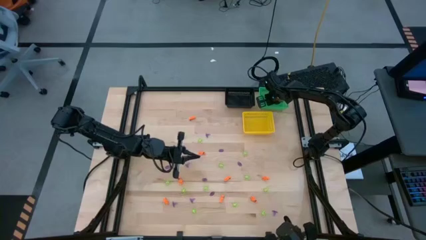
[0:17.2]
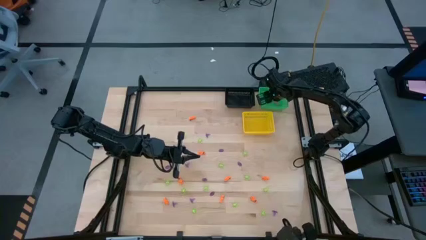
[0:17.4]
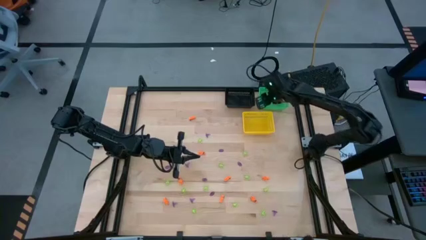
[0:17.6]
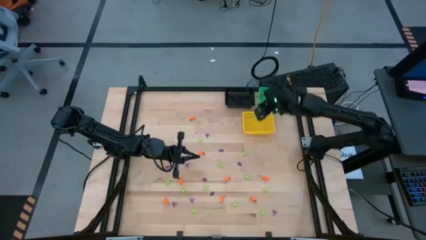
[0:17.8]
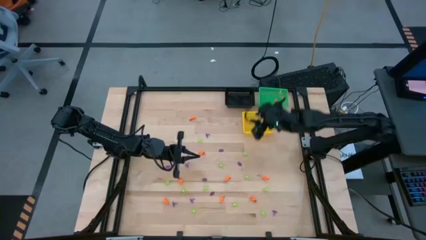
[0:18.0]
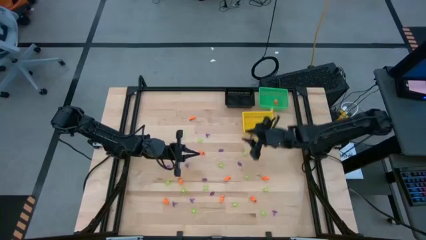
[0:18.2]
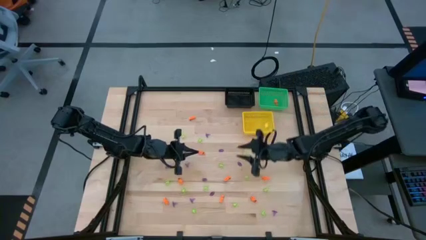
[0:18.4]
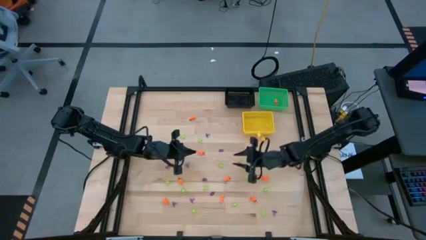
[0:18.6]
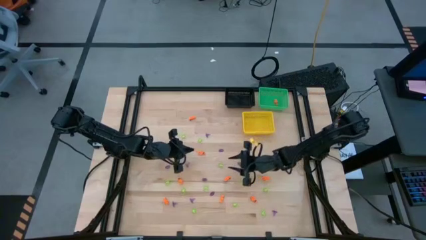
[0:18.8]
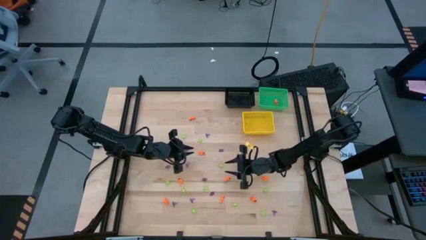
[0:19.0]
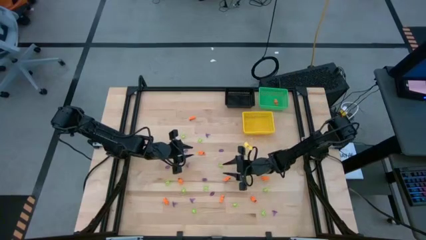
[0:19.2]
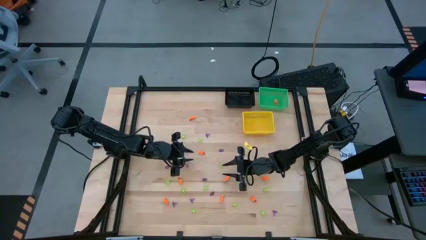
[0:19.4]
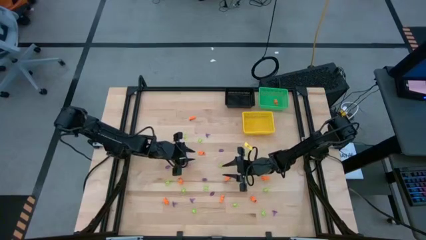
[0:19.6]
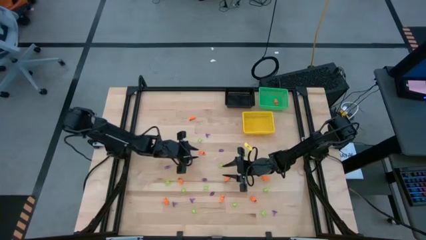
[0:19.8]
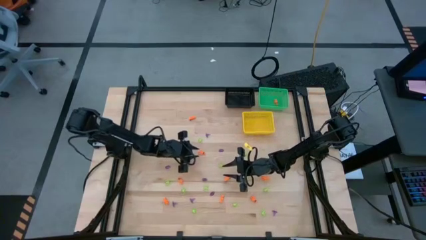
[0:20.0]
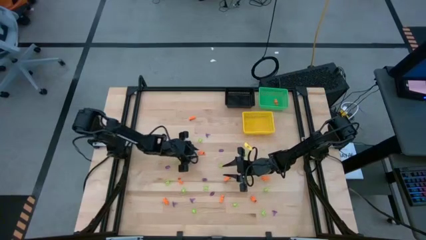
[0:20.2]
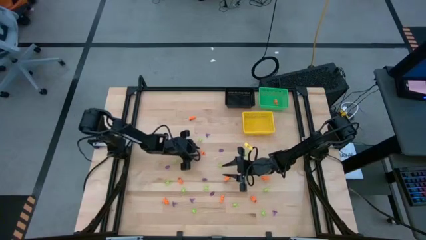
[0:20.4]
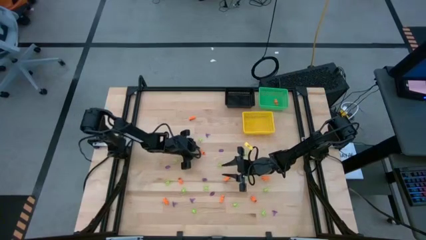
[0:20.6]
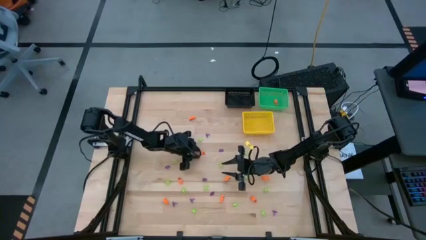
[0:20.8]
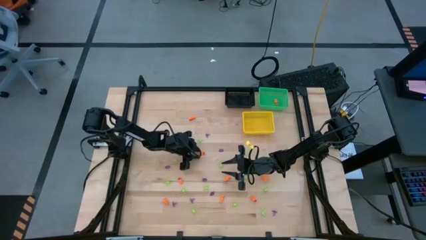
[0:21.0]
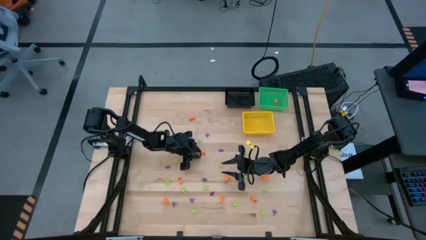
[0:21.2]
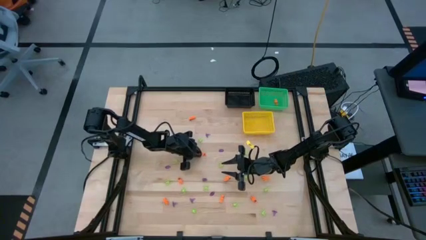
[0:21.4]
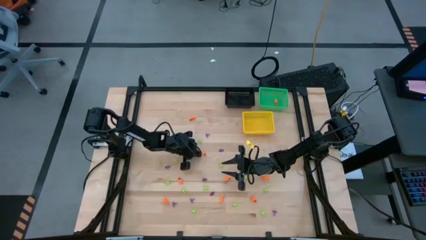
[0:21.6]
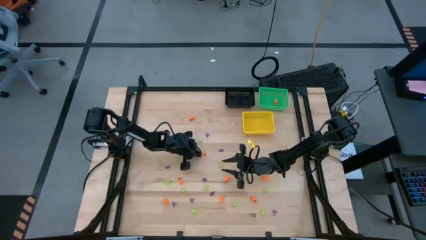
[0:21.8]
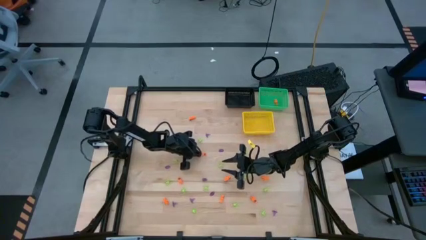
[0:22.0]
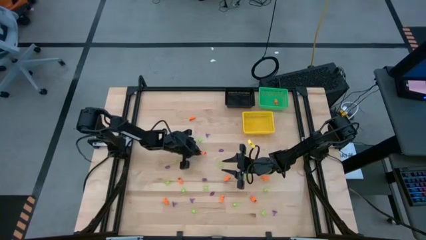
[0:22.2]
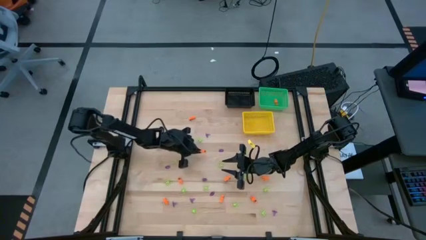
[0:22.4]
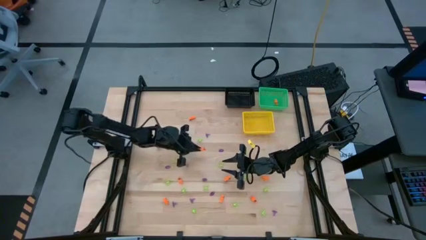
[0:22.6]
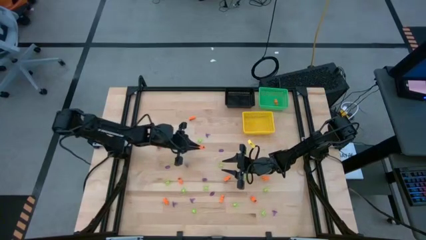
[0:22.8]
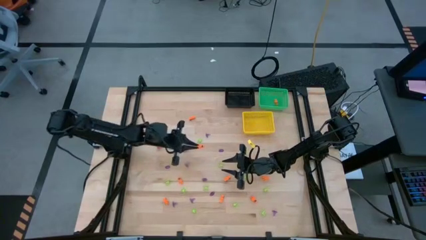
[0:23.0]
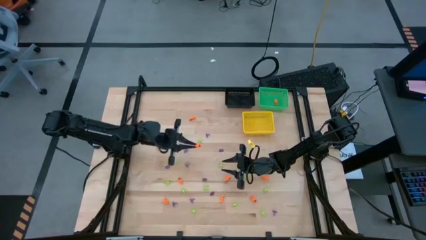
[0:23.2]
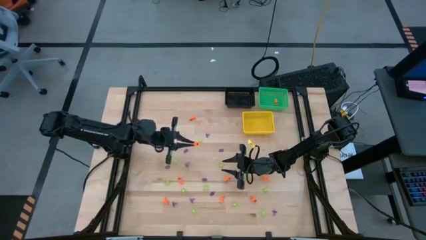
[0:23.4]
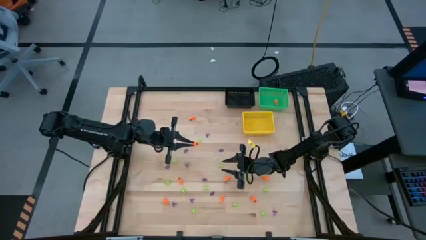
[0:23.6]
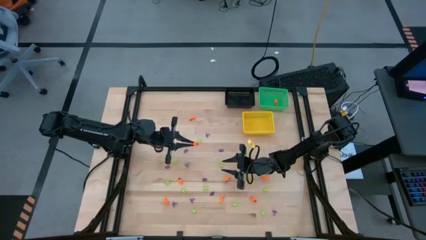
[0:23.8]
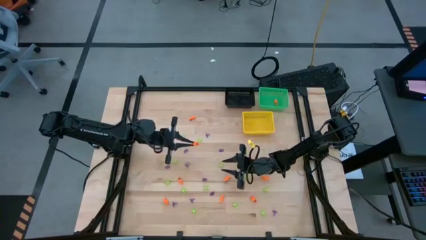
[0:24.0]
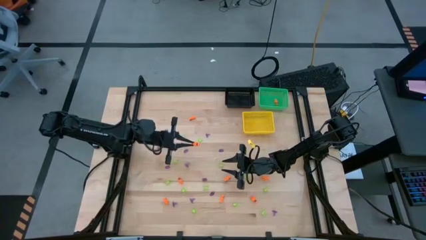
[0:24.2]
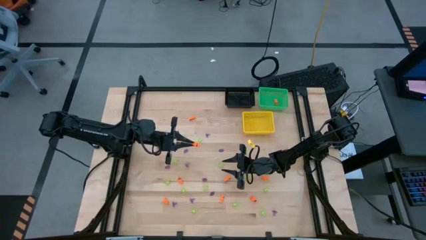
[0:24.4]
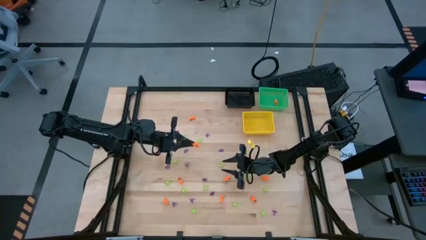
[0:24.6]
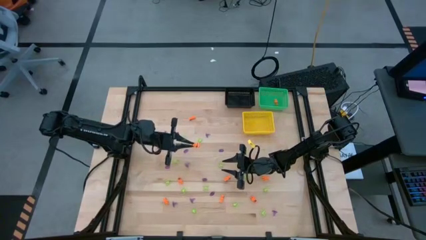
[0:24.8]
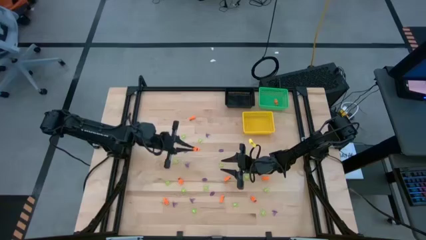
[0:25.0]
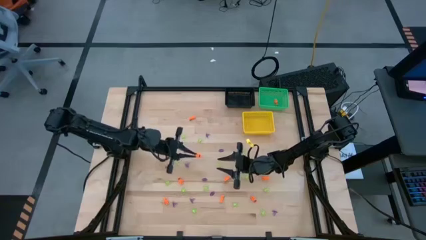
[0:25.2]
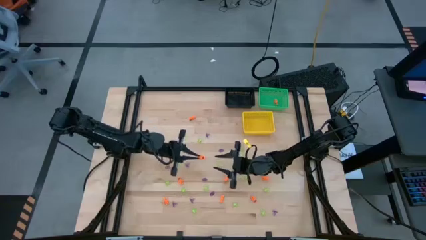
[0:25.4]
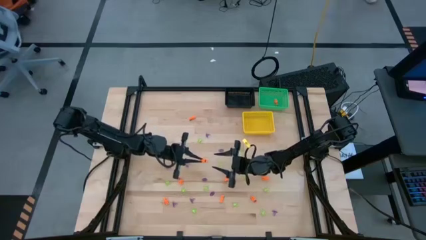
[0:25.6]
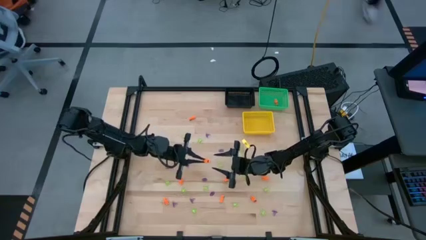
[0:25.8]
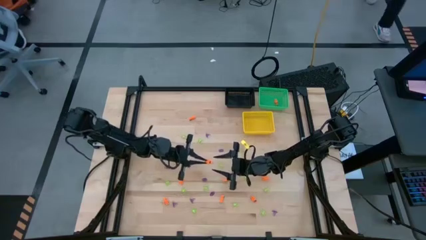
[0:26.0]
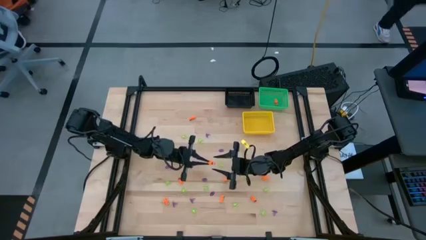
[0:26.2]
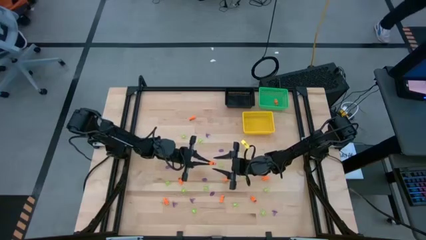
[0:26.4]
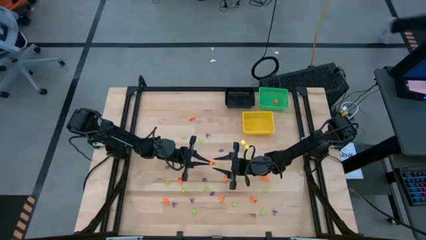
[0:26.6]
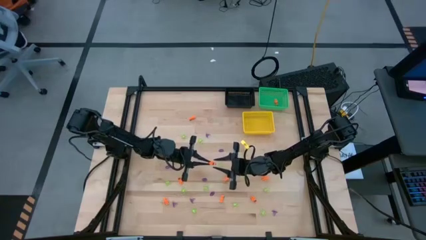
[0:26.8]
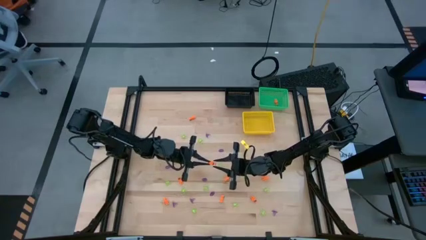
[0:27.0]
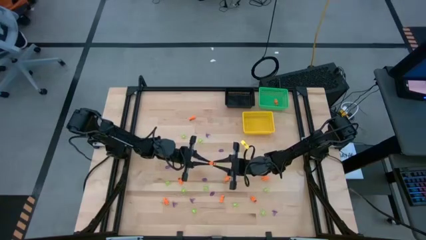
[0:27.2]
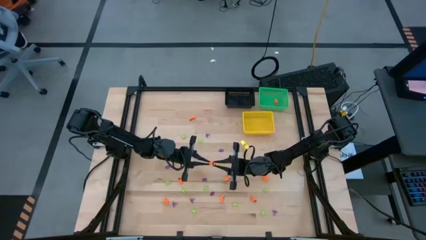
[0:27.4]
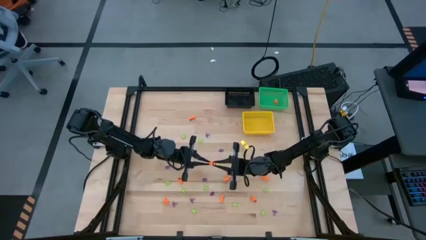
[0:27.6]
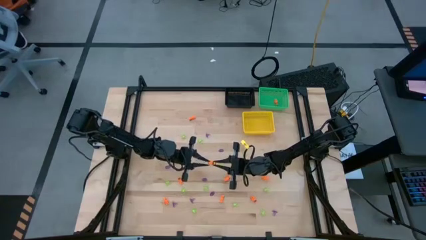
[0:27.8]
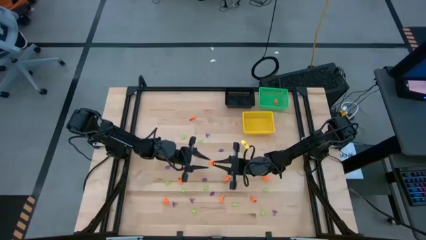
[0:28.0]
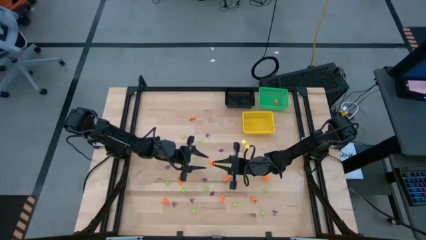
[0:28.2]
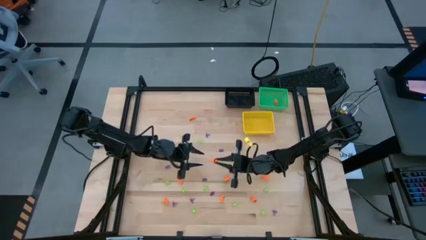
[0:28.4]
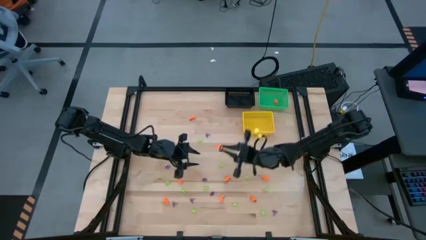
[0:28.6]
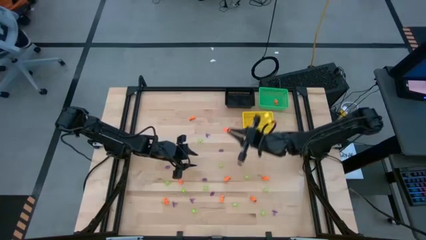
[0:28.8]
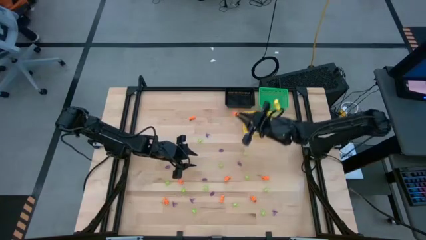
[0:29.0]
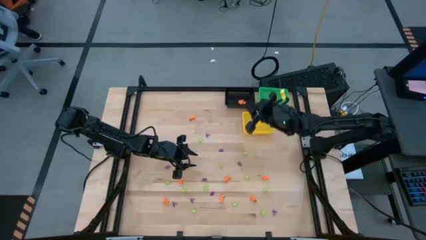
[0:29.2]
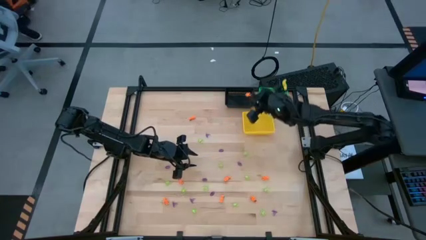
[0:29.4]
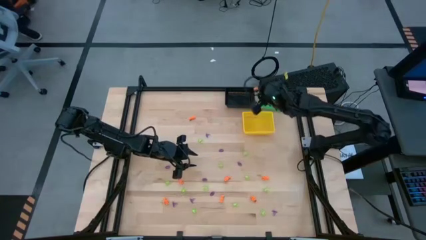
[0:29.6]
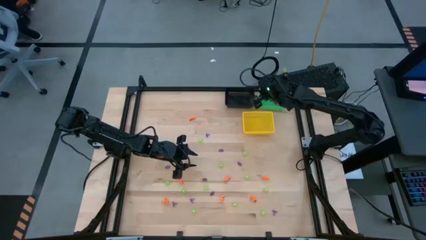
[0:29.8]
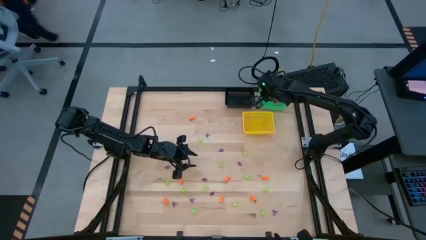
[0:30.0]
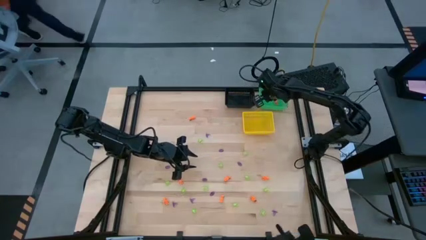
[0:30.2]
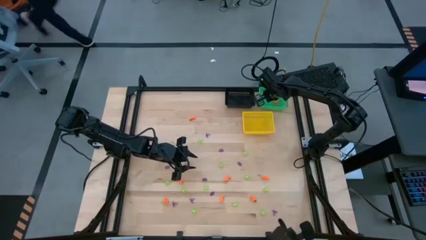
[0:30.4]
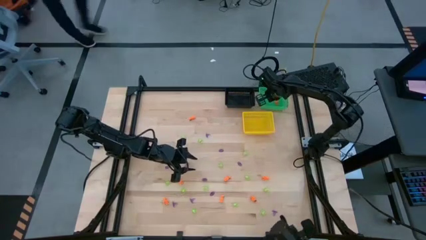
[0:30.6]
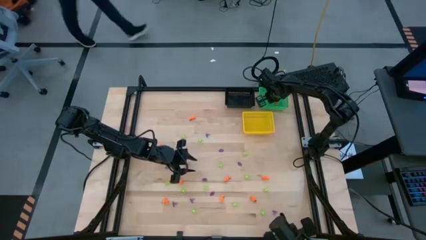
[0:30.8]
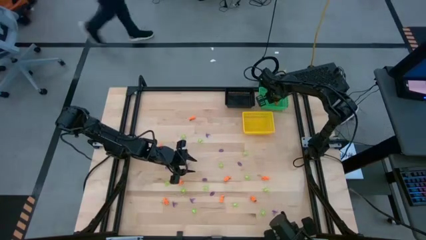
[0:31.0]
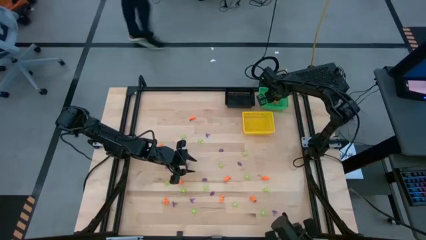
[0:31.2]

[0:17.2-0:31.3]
Task: Sort Halloween decoration
Put the orange skeleton toy into the green basket

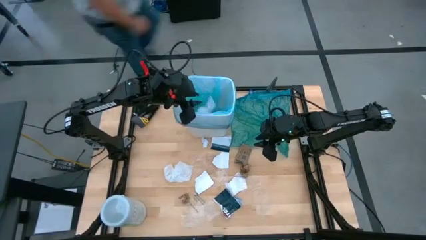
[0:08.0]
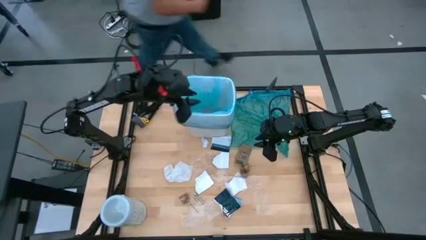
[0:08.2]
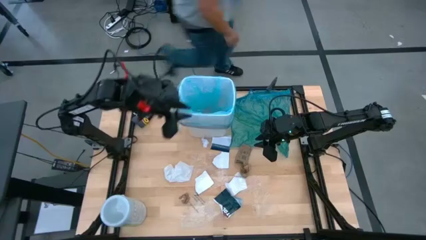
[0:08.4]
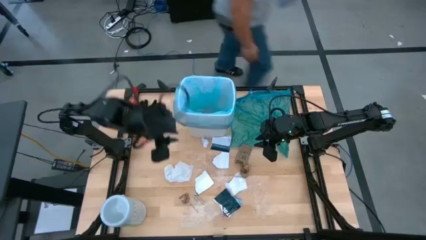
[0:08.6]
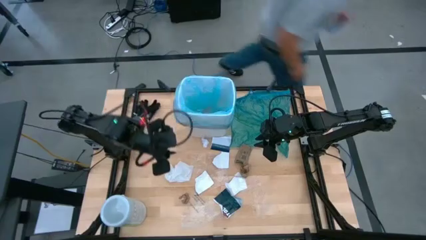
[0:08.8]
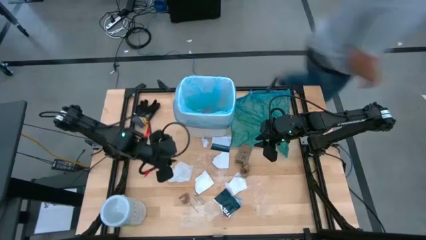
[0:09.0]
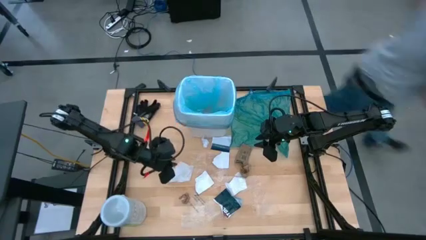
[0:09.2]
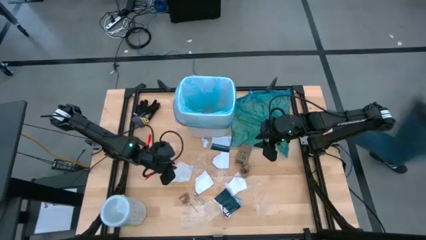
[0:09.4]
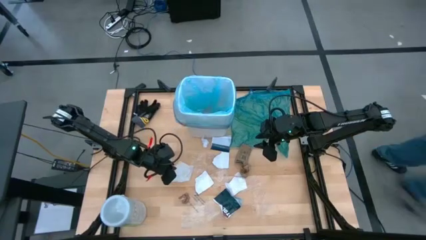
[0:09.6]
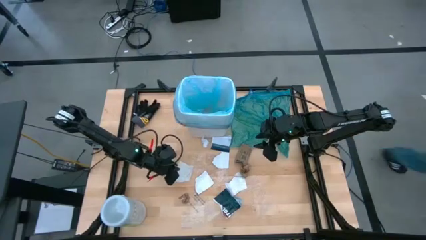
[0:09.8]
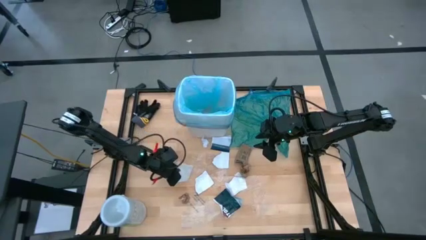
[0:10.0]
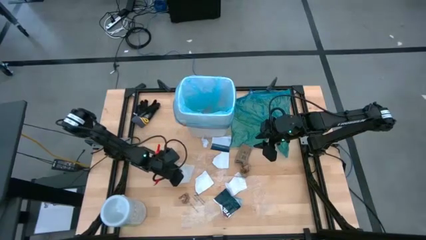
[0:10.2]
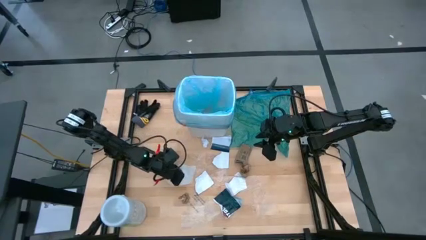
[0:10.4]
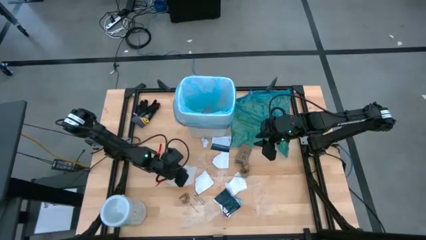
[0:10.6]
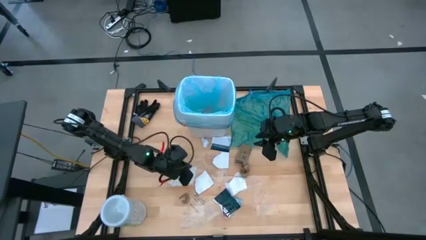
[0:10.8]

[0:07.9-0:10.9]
Task: place trash/remove bag and relplace
Put the white napkin into the trash bin
